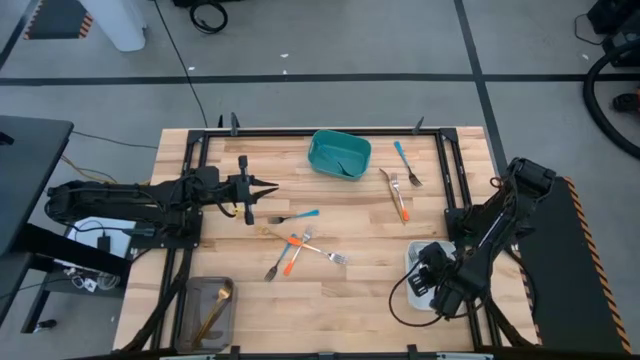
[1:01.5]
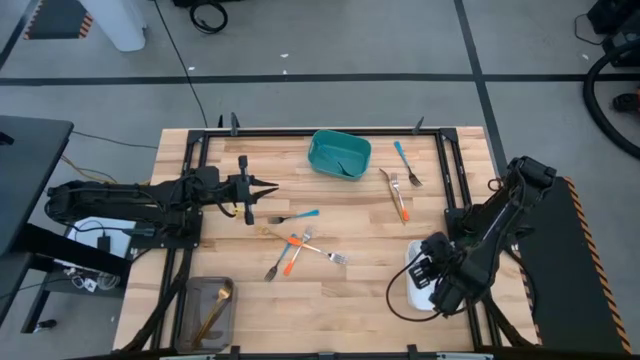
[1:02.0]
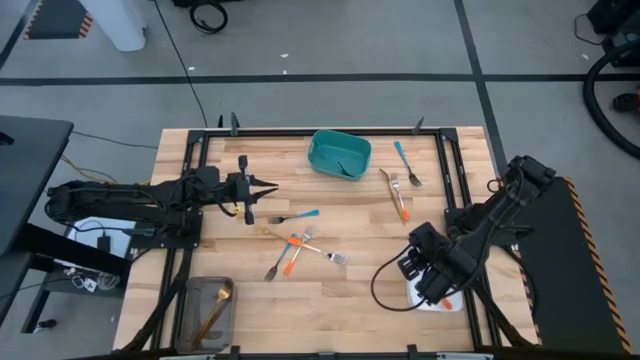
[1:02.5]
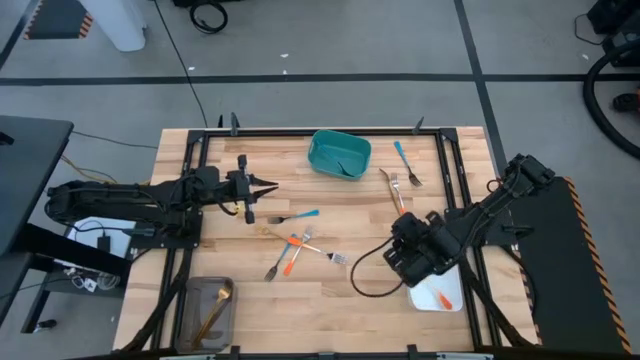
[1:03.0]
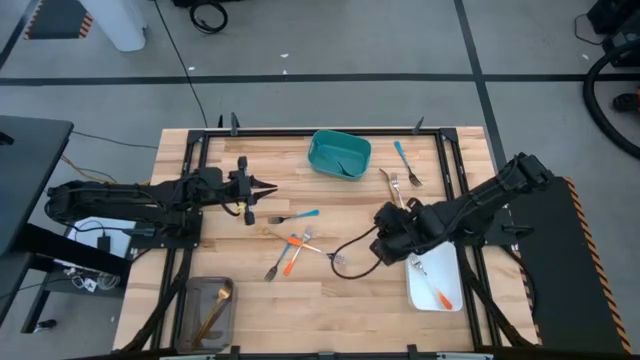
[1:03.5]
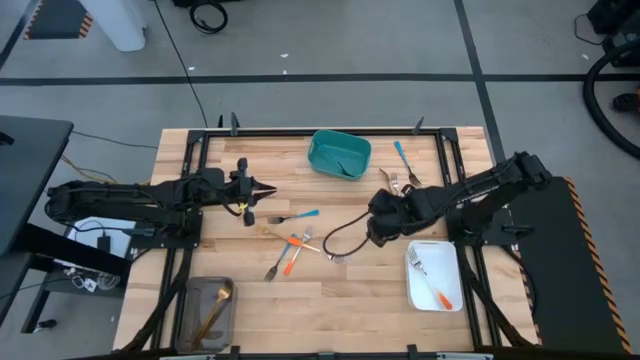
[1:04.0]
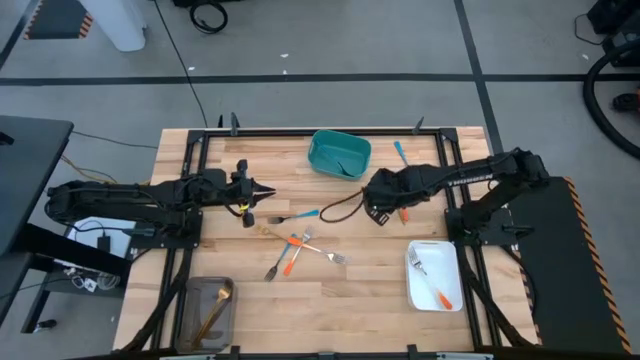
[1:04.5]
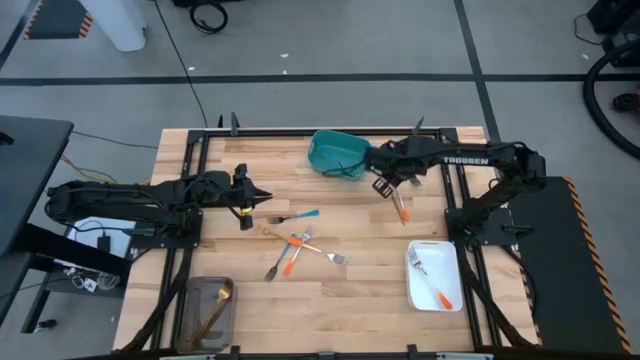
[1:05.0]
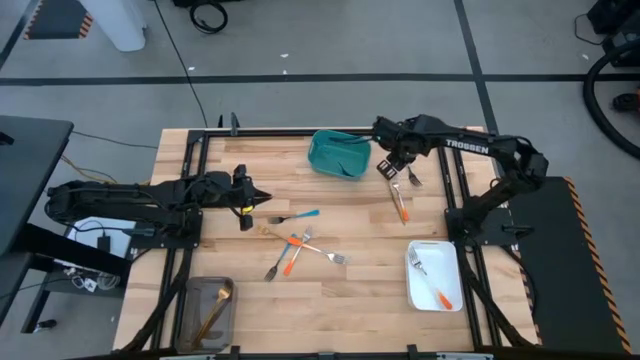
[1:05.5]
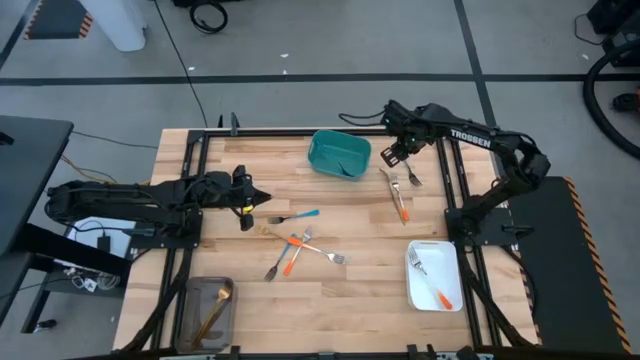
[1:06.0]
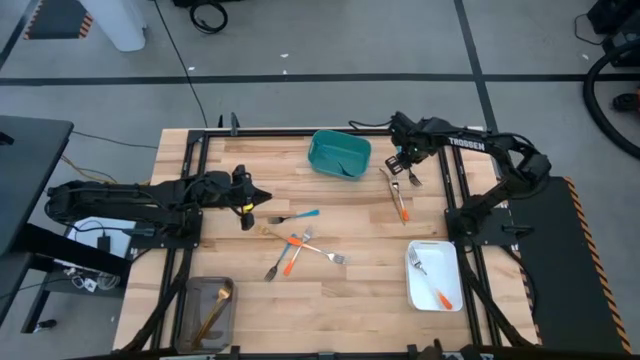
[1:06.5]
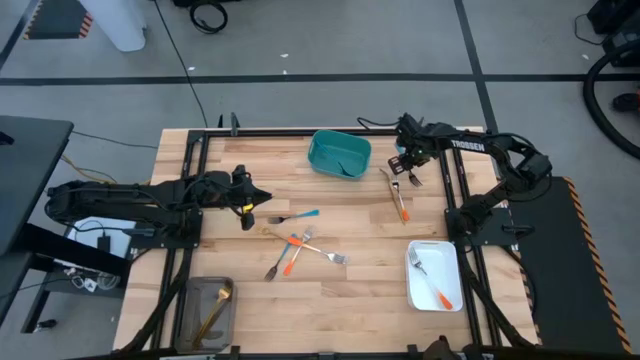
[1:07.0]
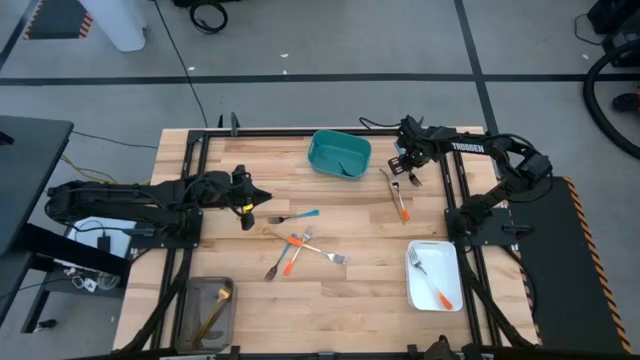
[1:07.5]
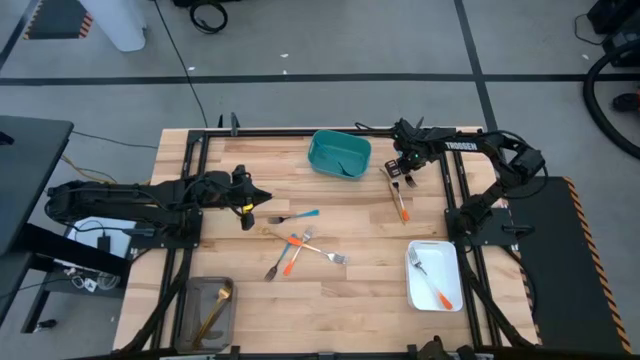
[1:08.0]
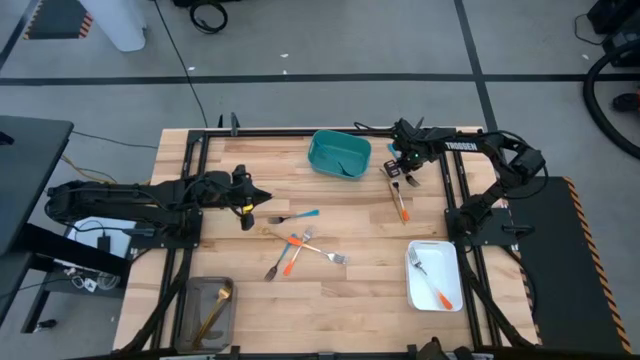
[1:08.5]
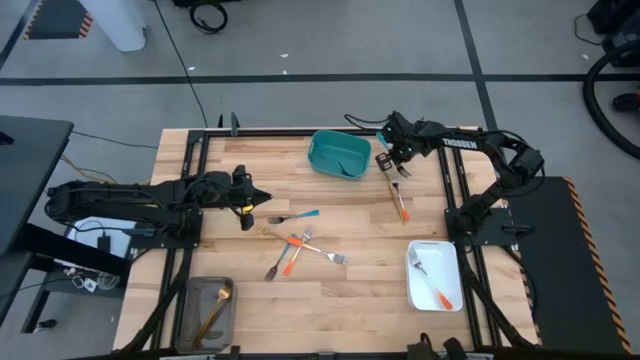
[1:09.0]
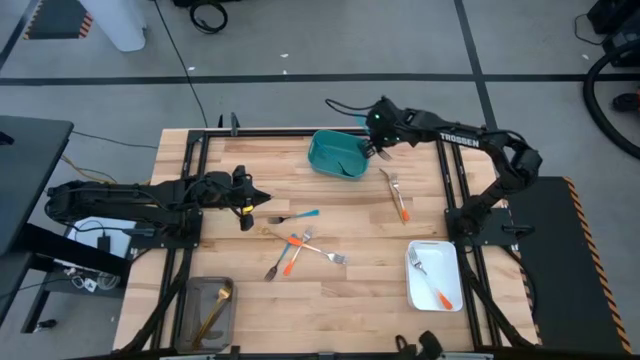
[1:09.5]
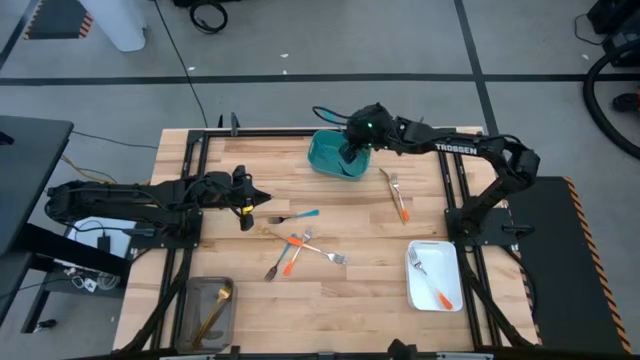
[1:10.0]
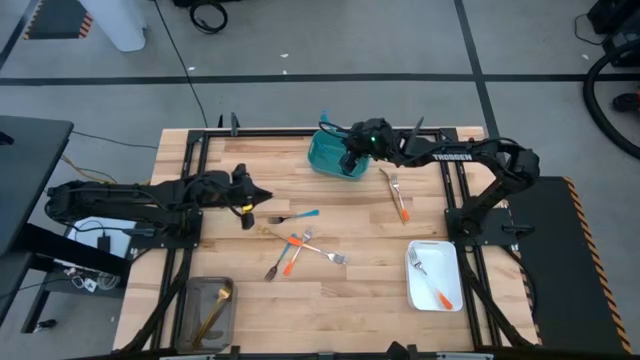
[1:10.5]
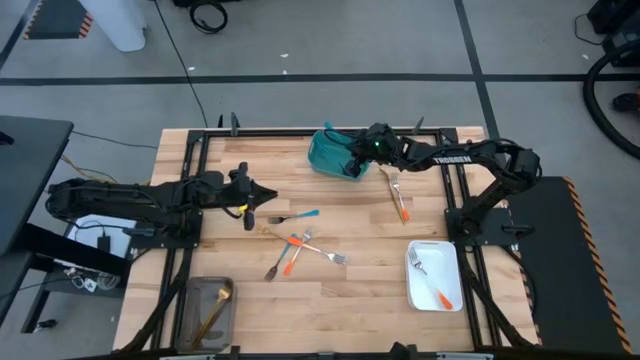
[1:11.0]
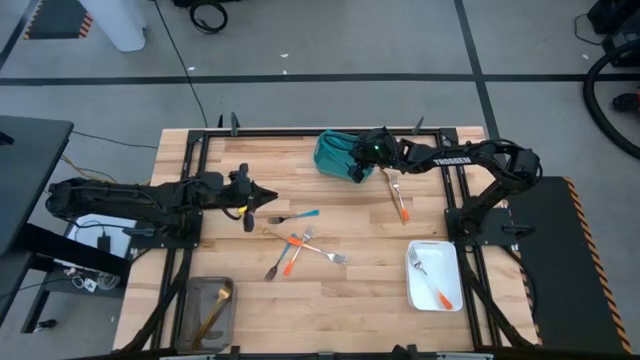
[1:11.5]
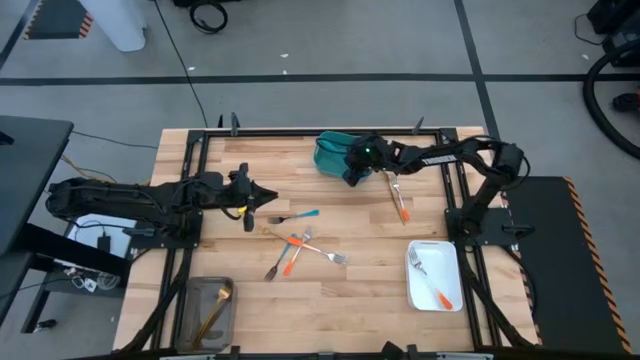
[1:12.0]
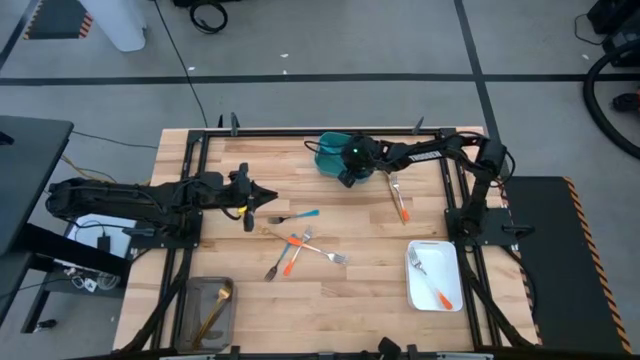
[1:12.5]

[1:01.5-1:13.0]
Task: Sort silverware by color (type)
Put the blue fork into the green bin

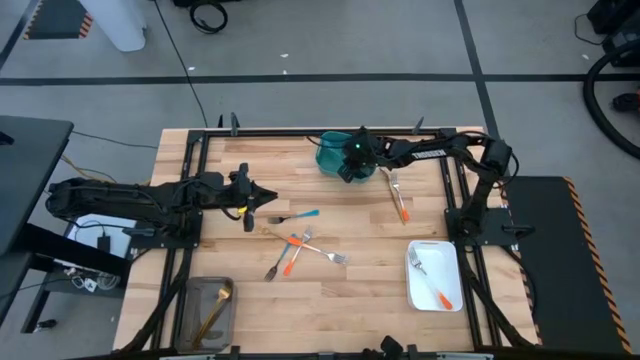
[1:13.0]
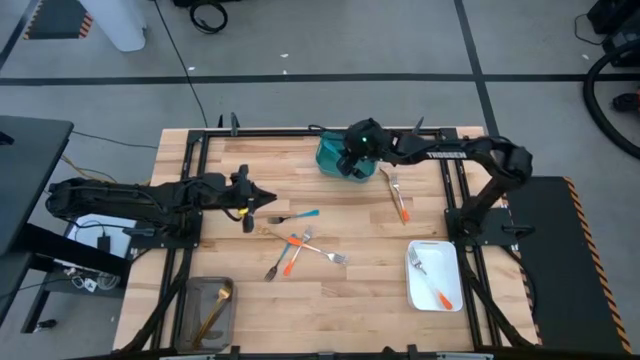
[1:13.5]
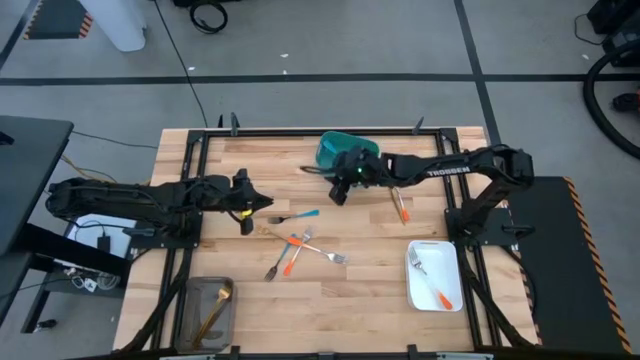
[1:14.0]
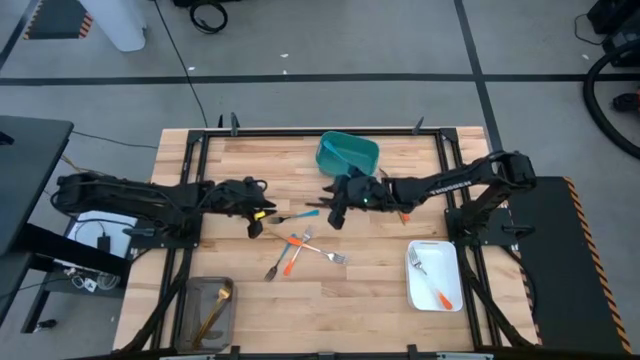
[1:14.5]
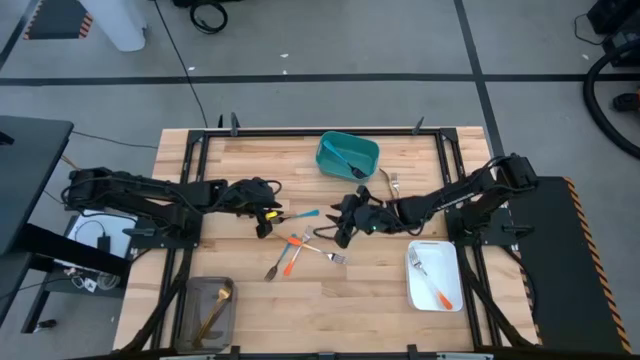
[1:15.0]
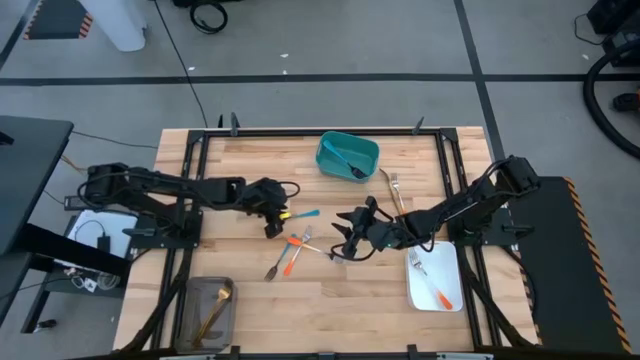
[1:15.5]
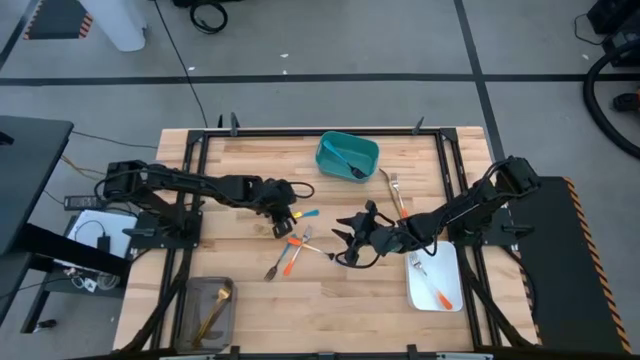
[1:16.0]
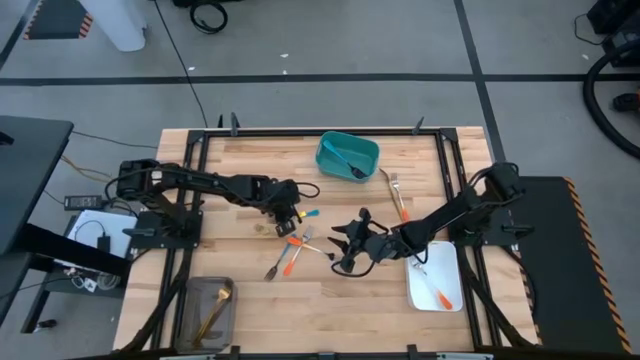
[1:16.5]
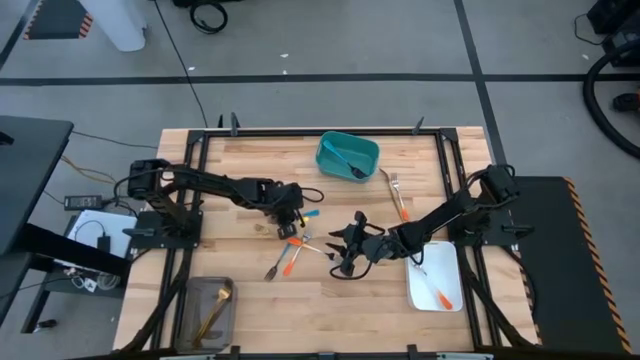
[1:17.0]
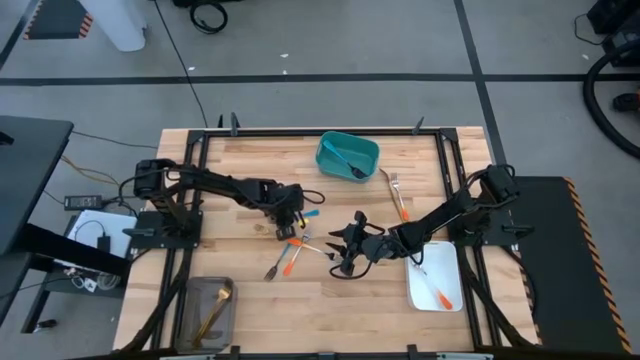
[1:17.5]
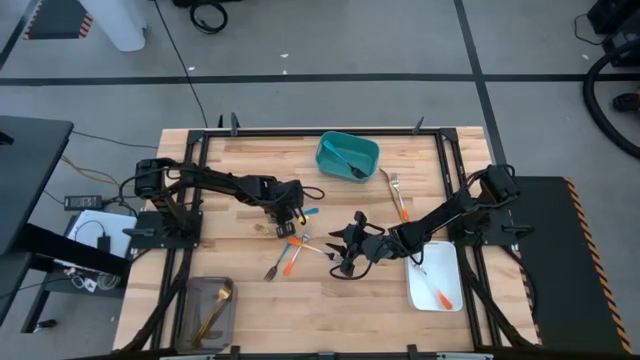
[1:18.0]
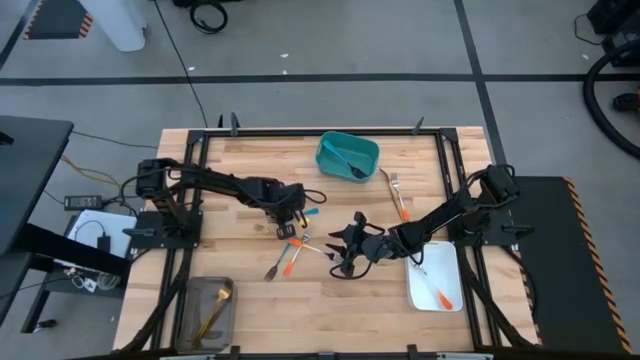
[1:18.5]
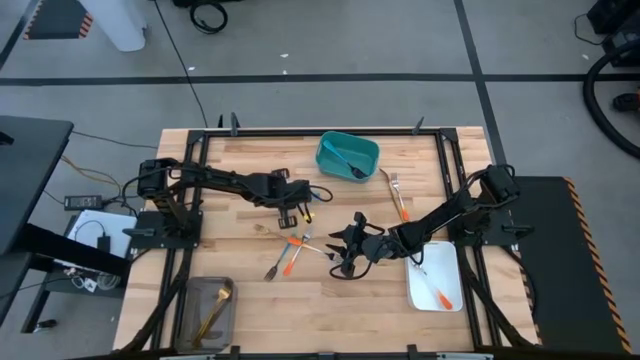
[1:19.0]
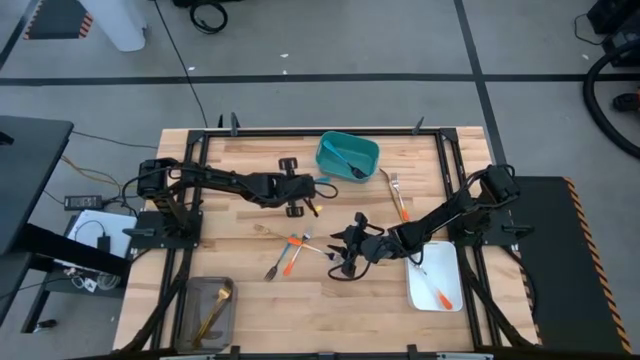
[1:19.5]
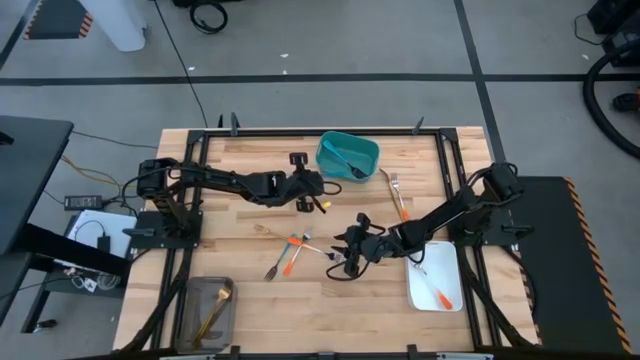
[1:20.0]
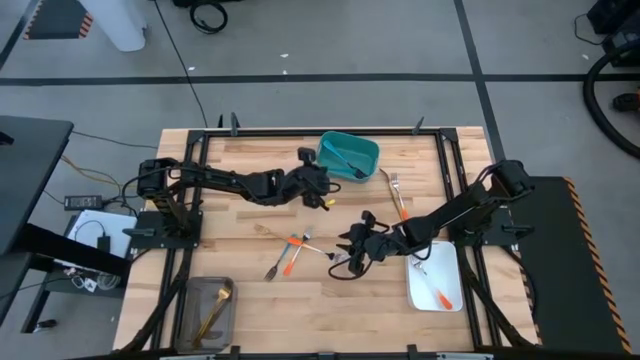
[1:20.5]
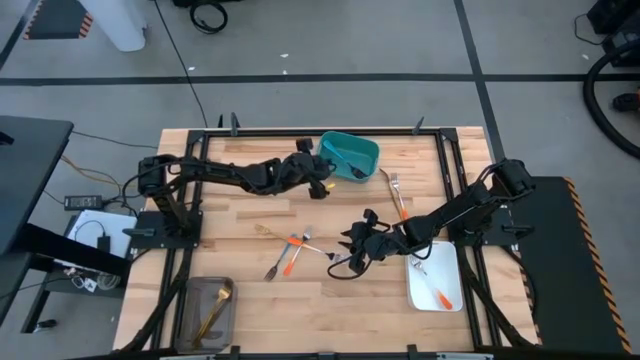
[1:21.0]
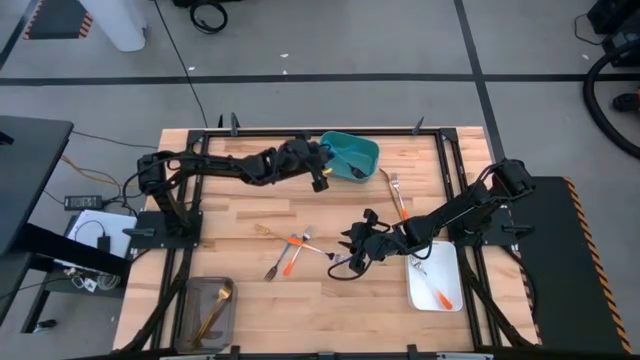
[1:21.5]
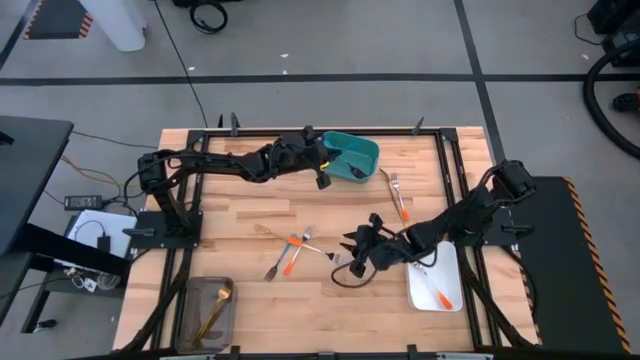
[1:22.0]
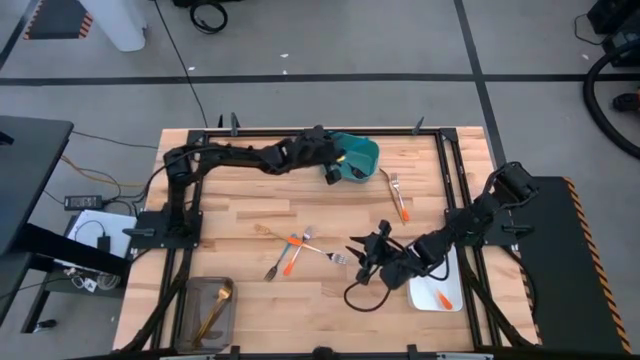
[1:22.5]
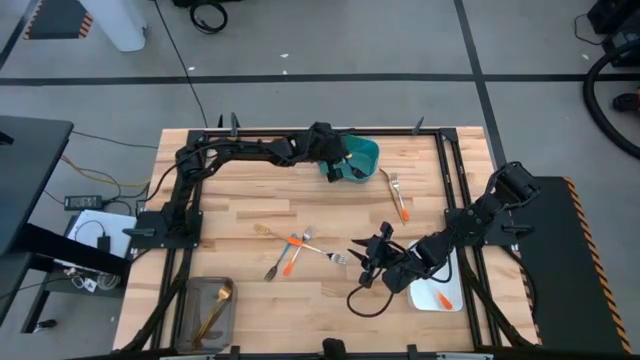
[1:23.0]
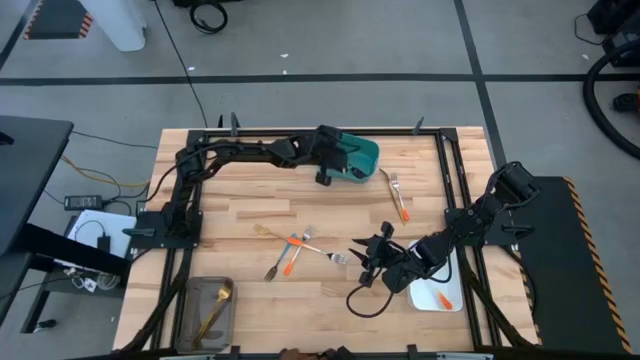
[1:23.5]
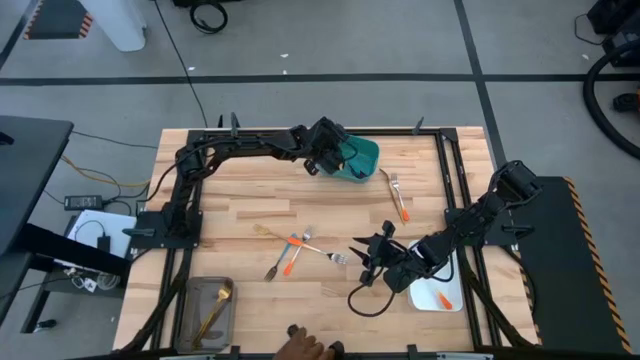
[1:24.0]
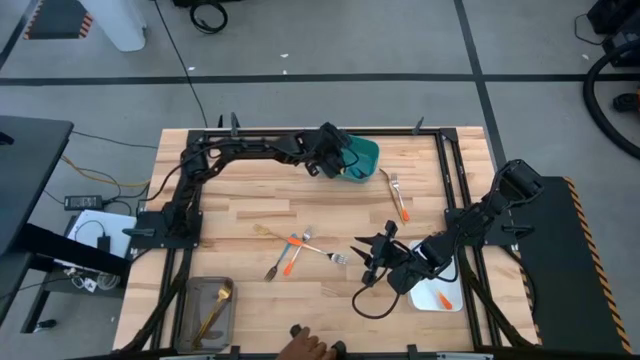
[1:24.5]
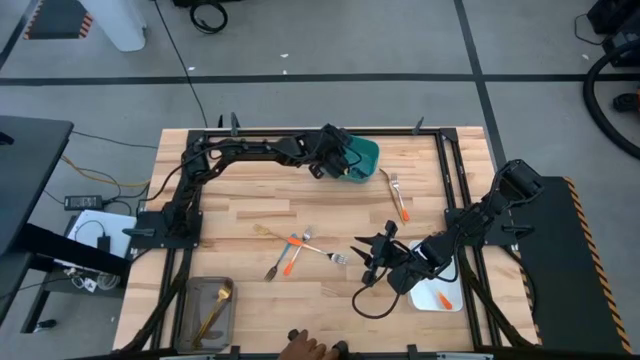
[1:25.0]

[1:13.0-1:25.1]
Put the blue fork into the green bin
